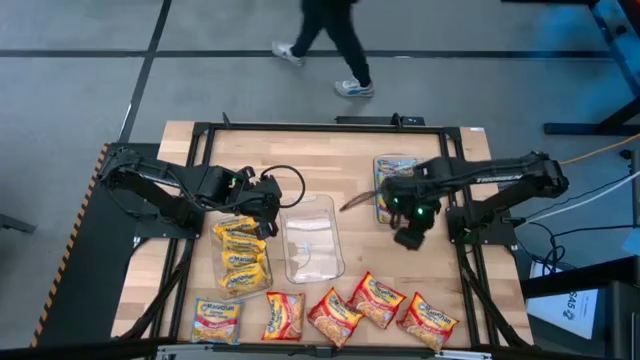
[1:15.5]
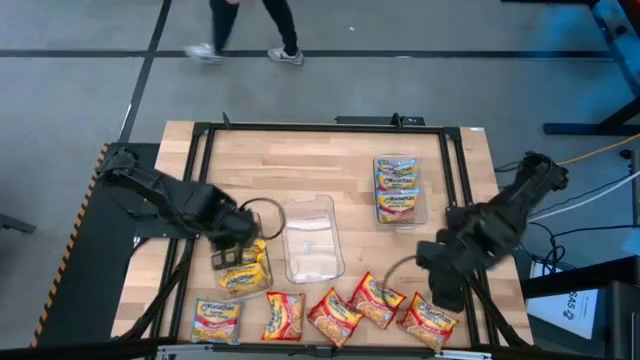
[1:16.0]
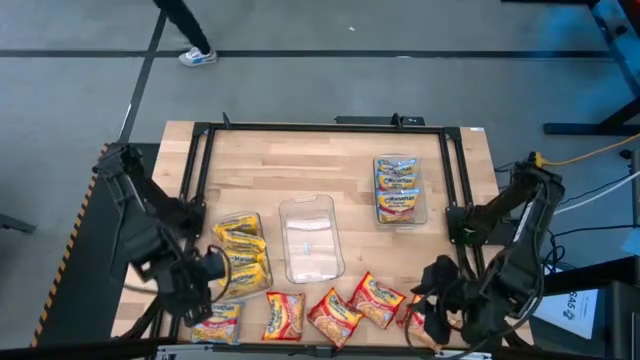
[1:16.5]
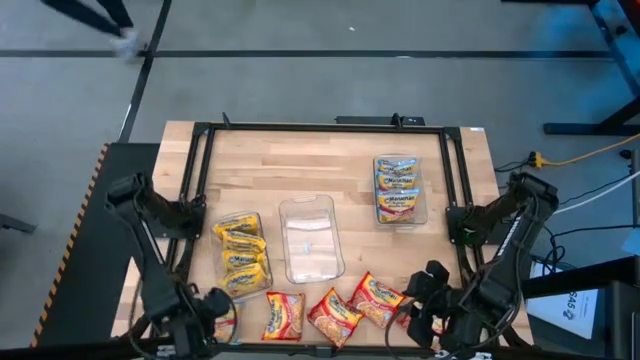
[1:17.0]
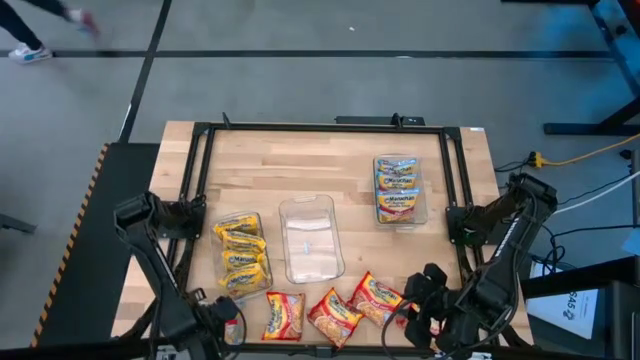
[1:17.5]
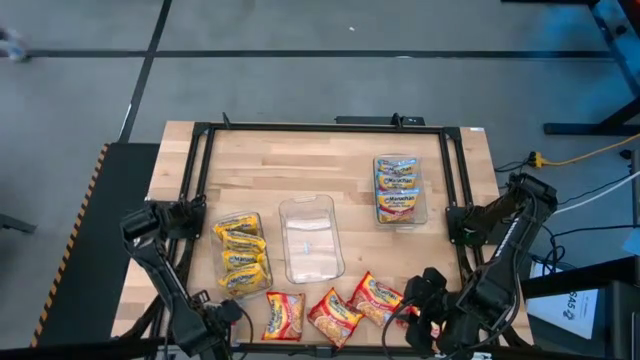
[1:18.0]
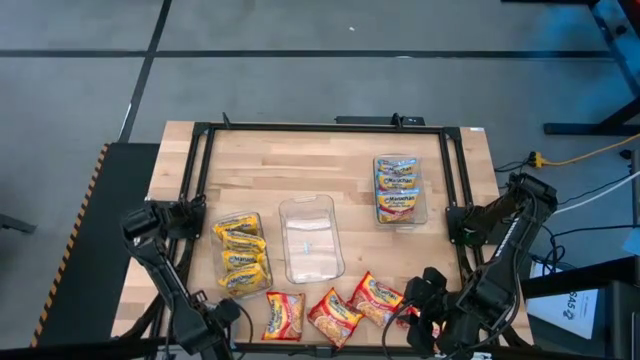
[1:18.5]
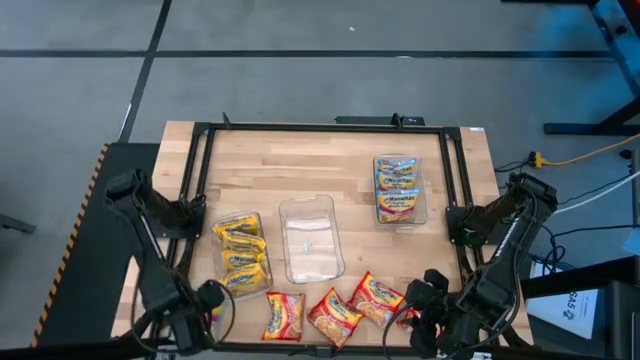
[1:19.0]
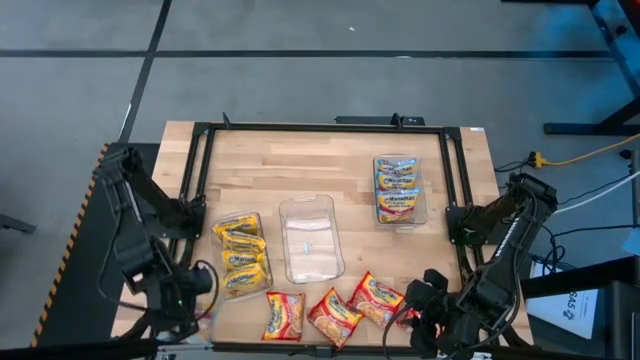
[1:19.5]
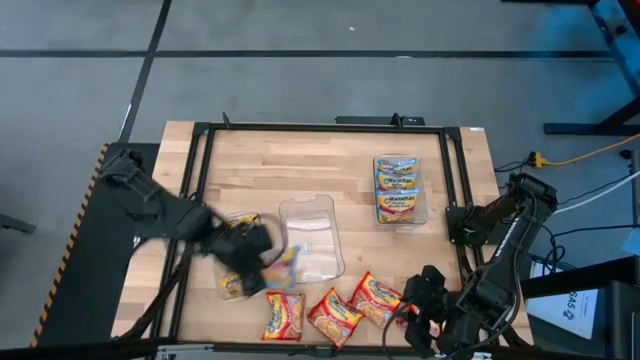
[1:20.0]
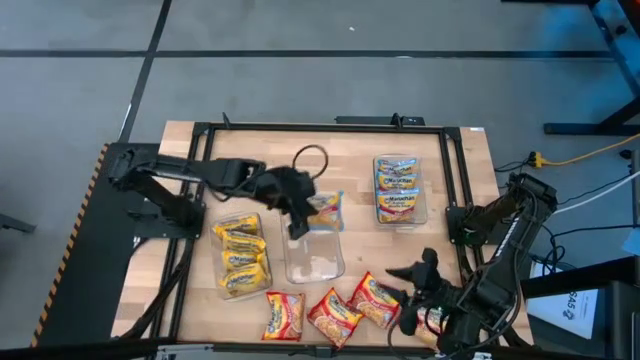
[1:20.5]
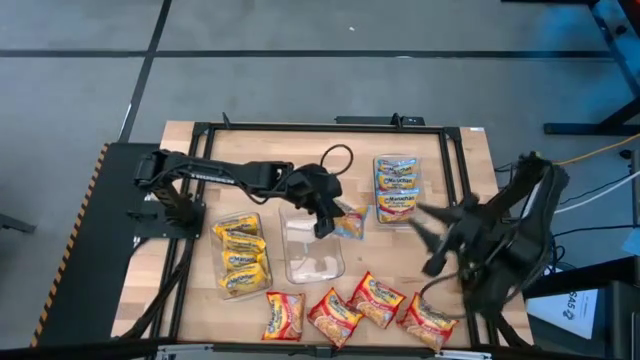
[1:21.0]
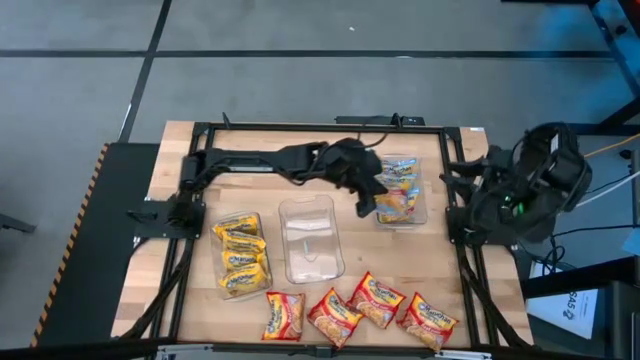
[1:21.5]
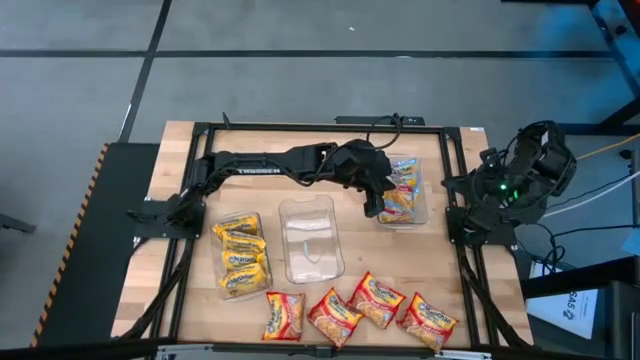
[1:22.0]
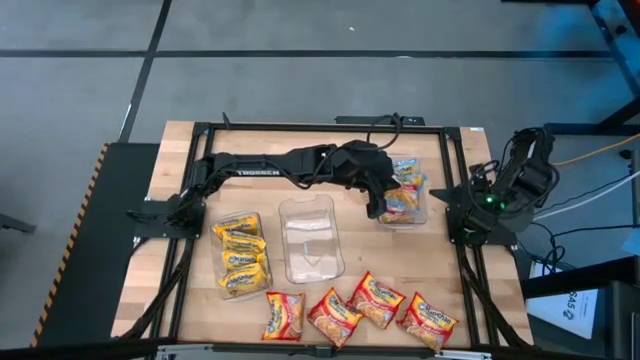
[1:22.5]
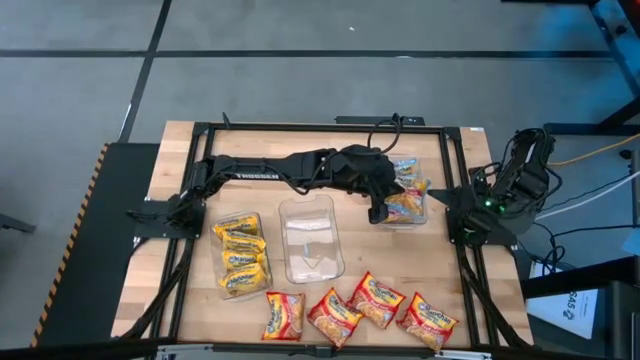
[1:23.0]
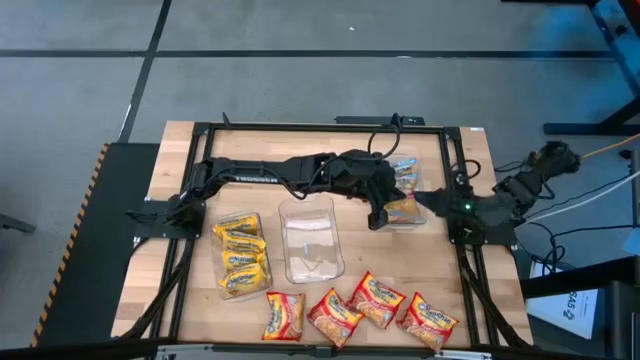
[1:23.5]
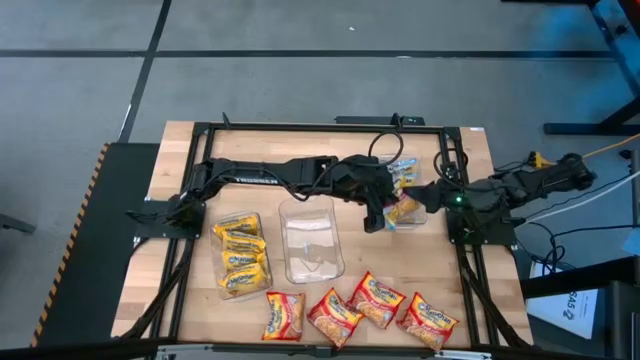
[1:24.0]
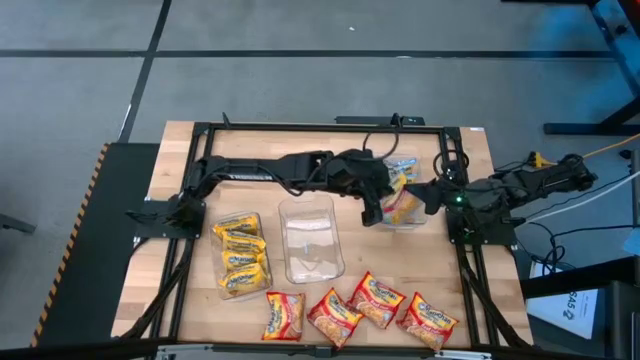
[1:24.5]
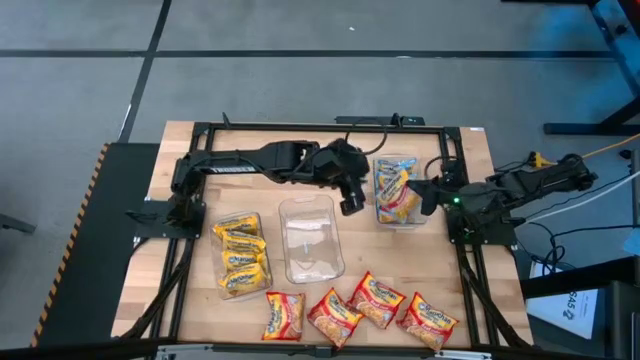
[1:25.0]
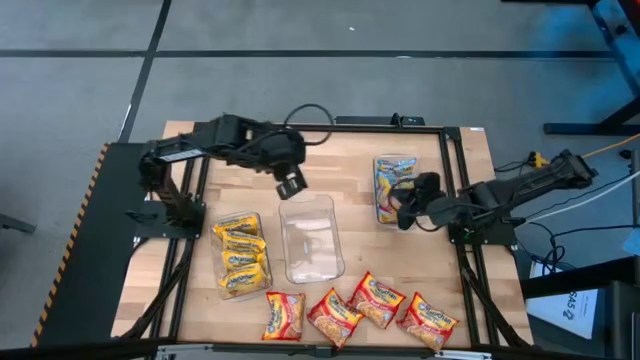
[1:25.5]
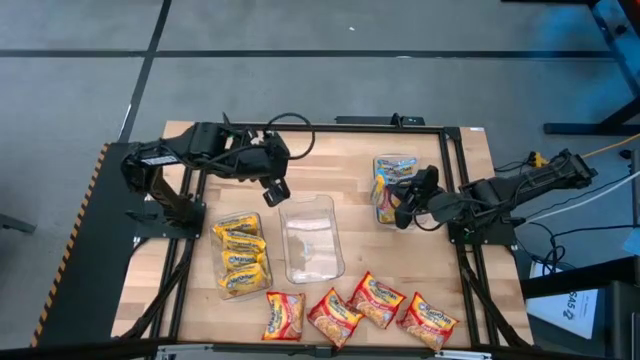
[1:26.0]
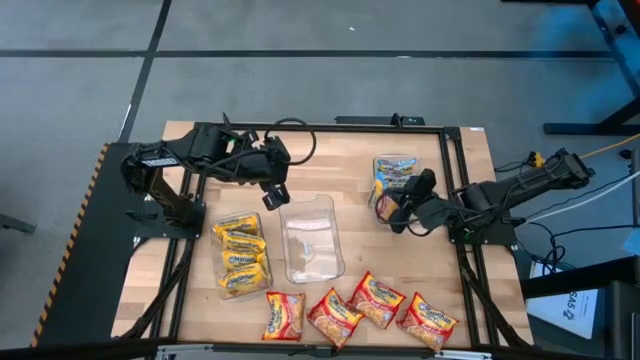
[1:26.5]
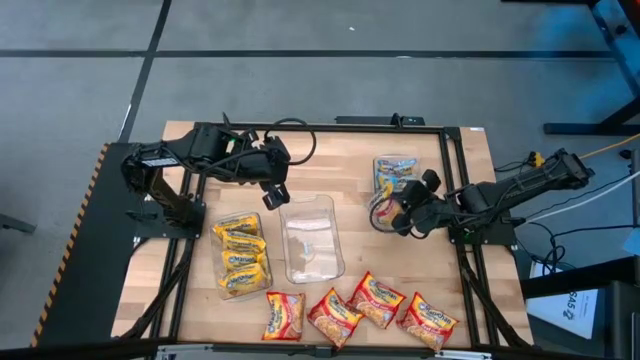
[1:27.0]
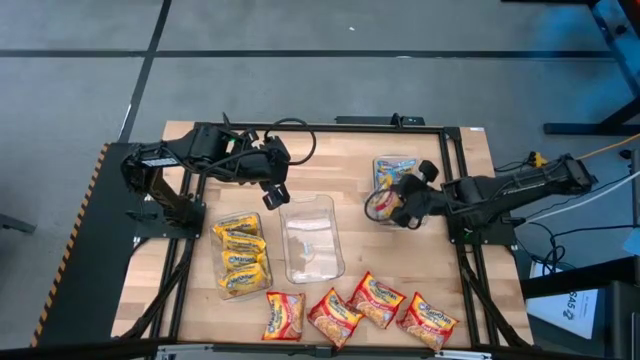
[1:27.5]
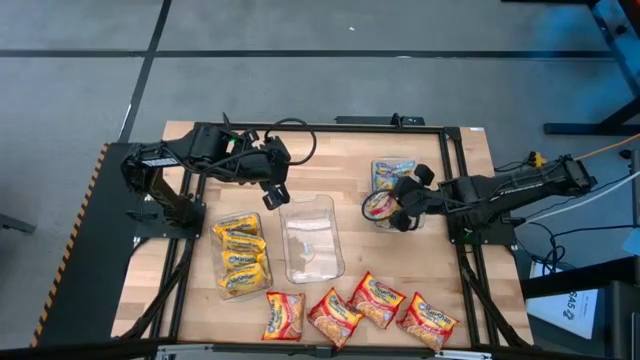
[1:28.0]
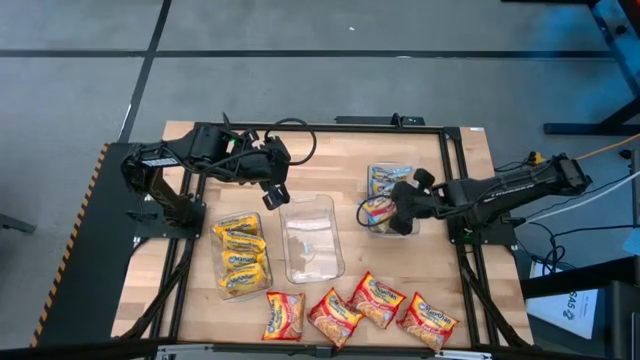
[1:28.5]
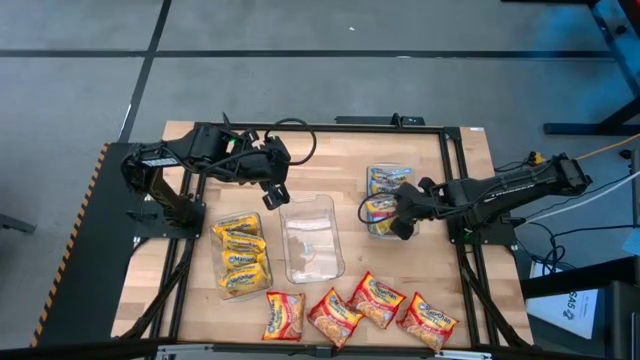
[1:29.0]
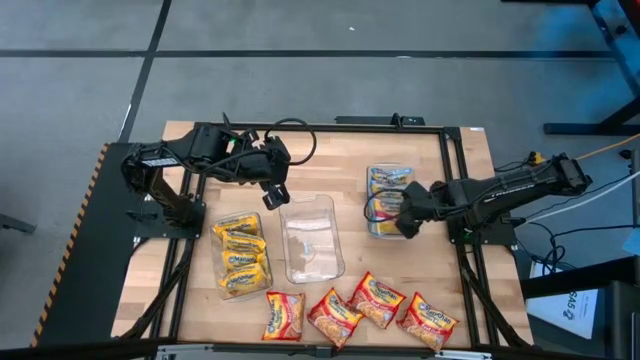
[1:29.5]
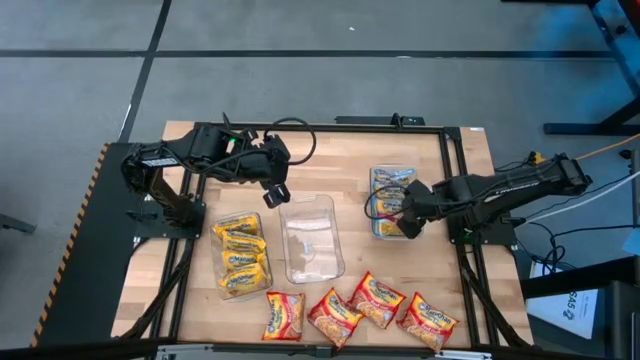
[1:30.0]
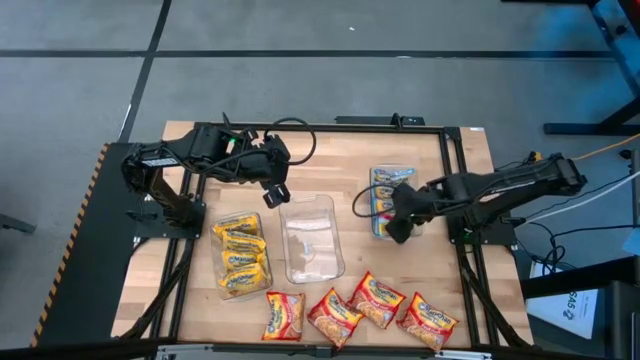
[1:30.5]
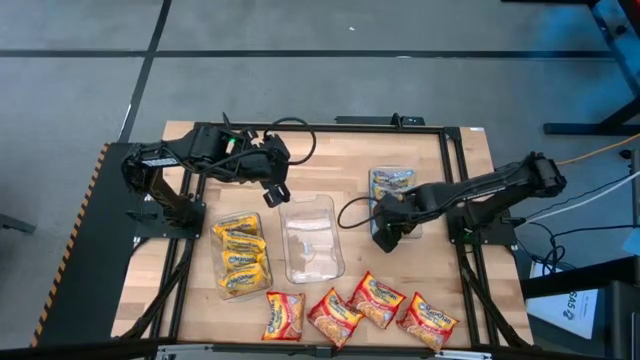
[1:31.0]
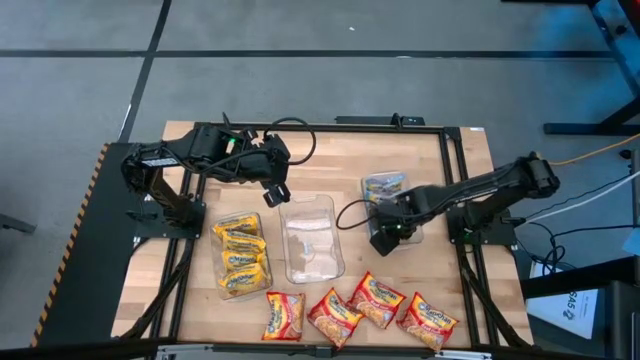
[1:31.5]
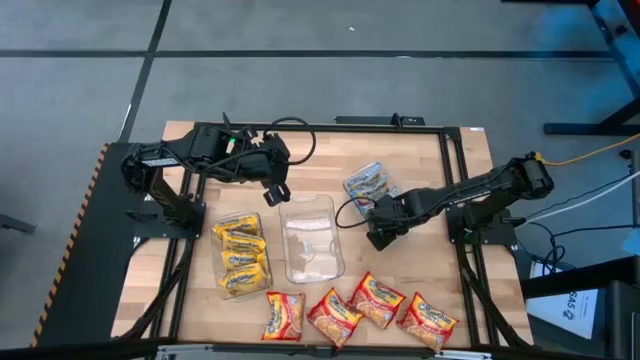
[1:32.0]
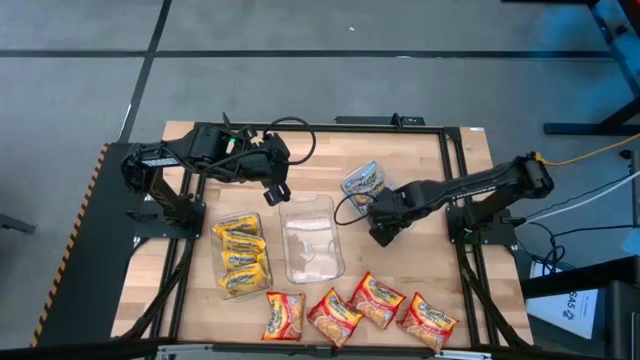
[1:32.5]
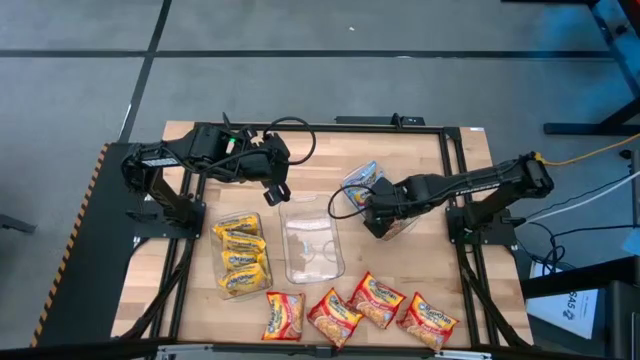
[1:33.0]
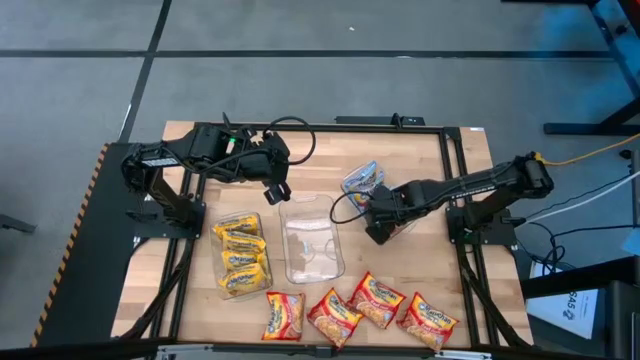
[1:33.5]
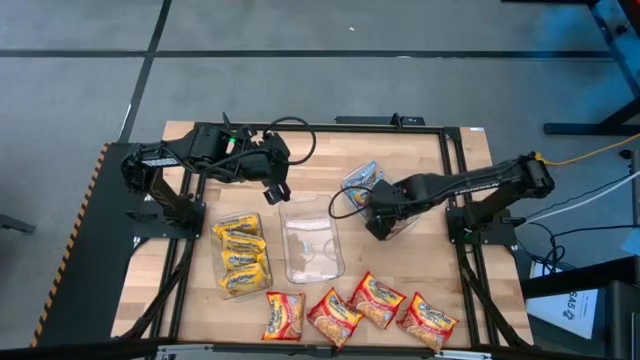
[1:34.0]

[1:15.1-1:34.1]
Task: Sort Maruchan noodles
Put the blue noodle pack into the right transparent bin

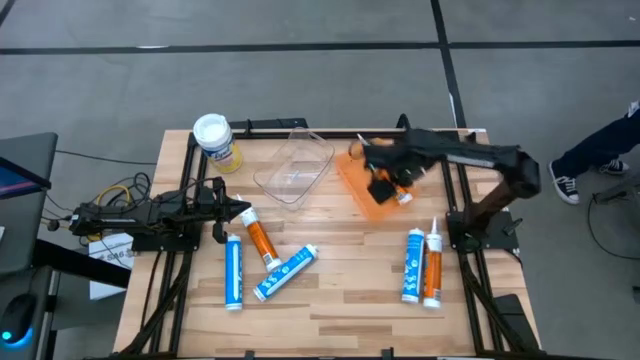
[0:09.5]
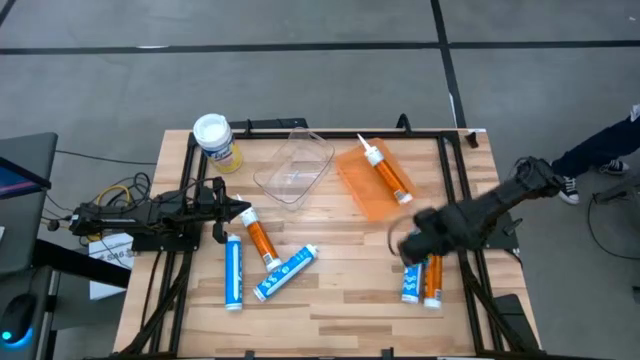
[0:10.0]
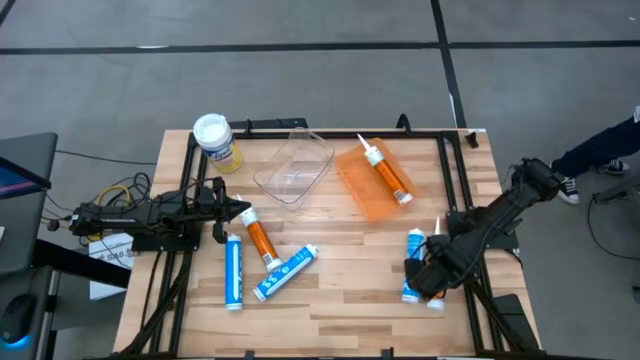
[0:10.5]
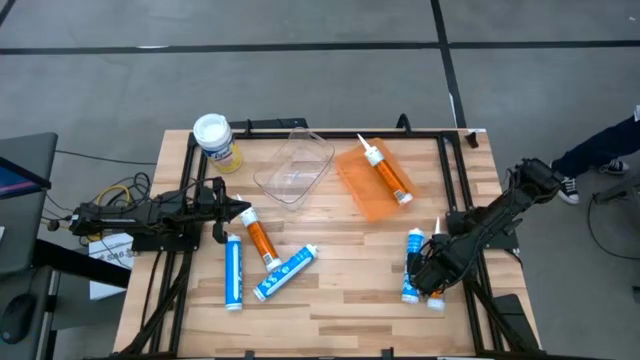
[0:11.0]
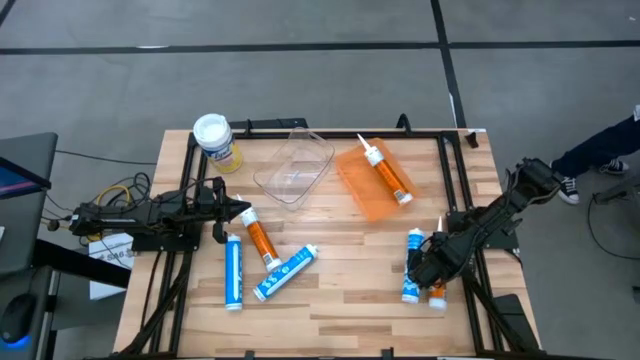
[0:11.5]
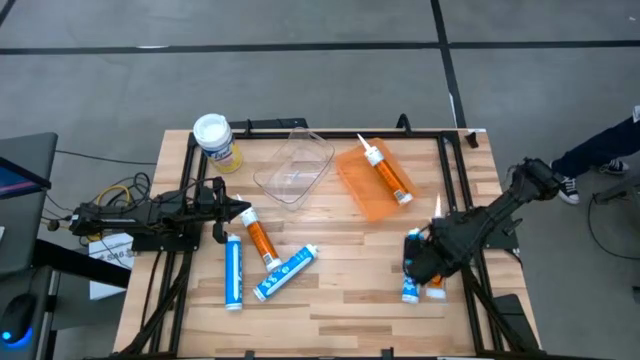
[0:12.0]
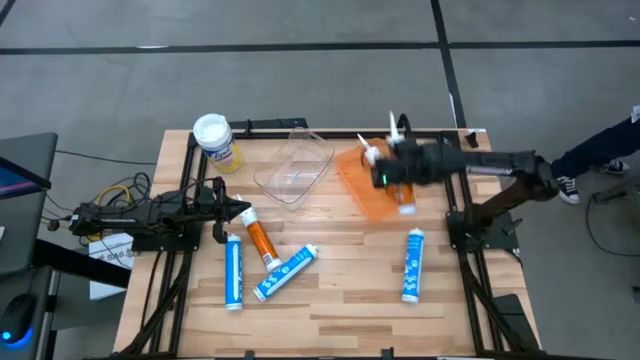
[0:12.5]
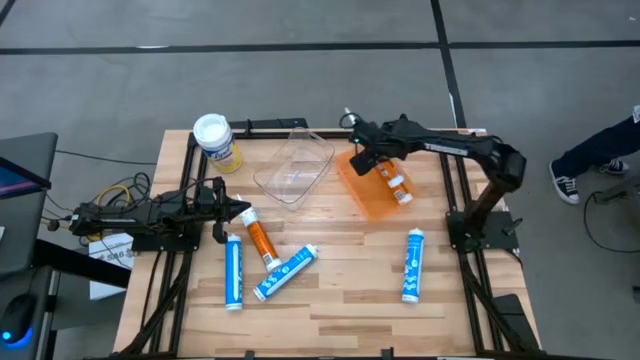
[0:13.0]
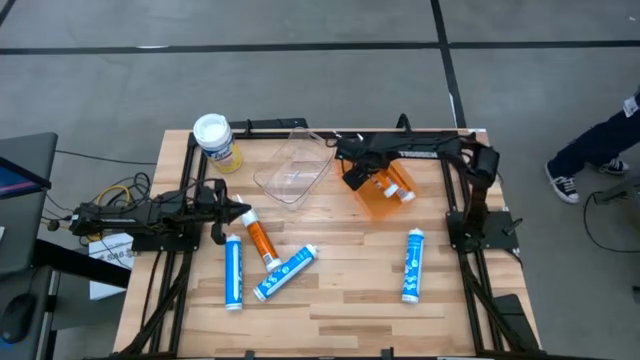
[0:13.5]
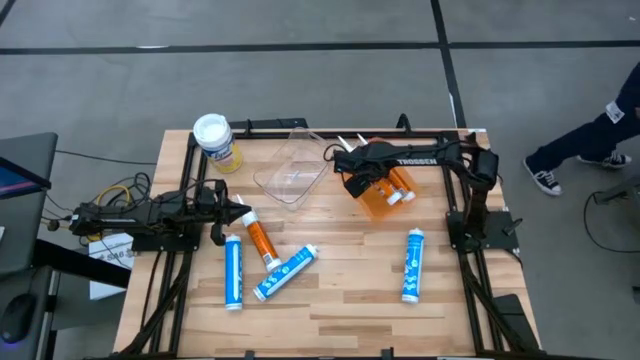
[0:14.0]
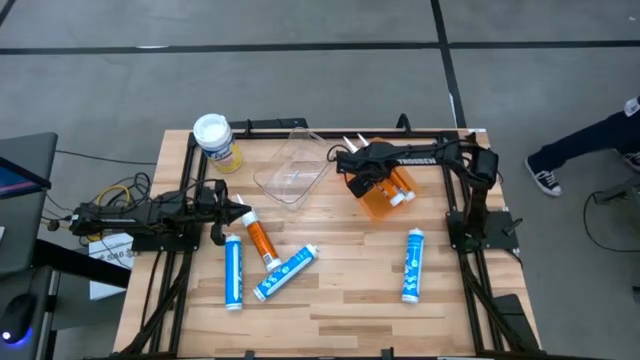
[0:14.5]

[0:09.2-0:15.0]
Task: Pick & place silicon tubes, Sealant and Lysol wipes
Put the right orange sealant into the orange bin
